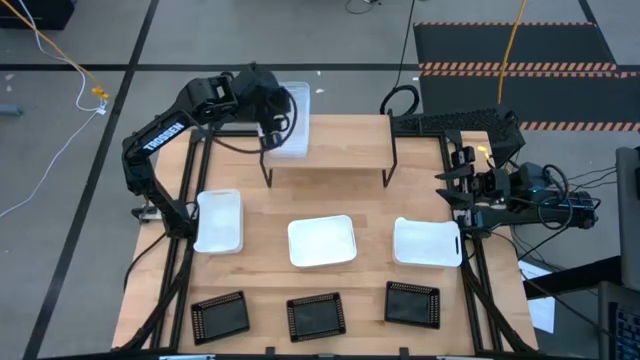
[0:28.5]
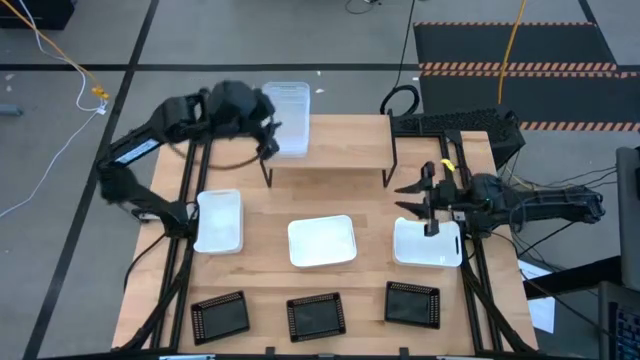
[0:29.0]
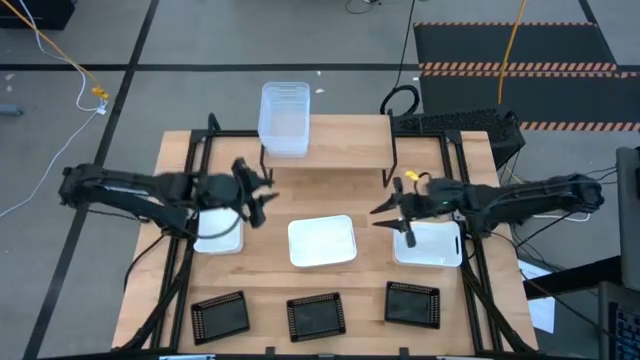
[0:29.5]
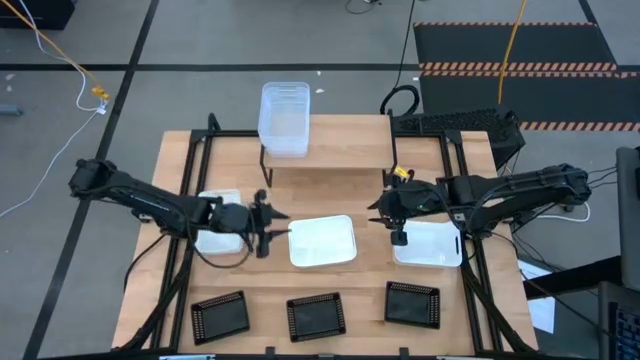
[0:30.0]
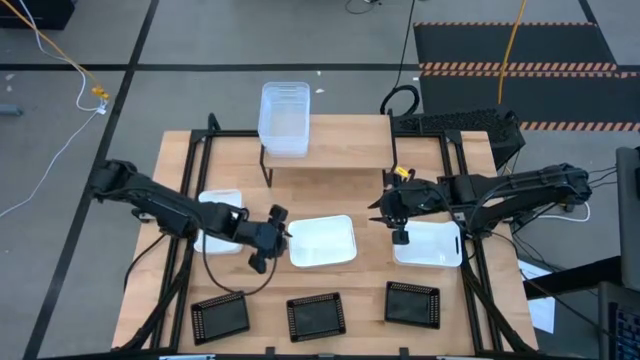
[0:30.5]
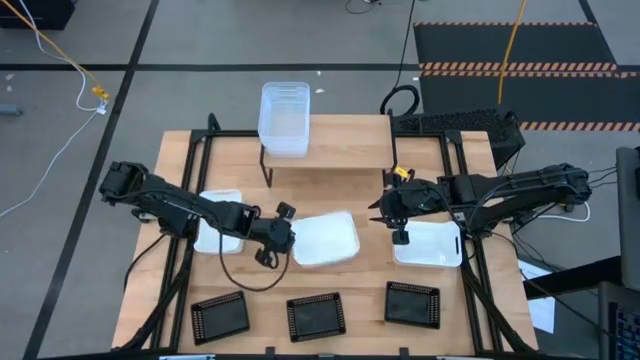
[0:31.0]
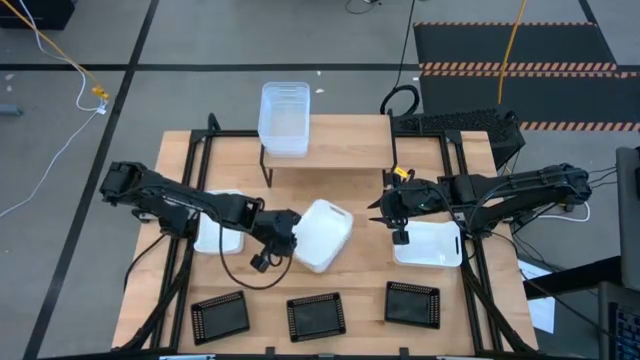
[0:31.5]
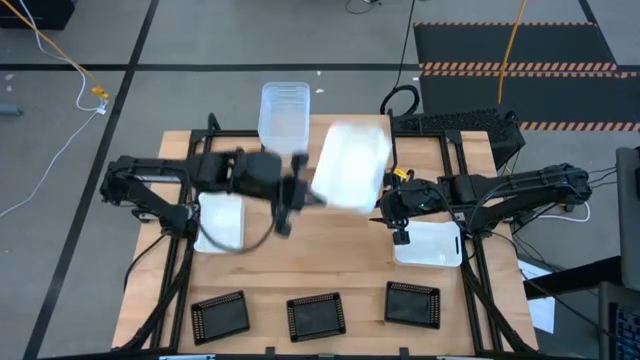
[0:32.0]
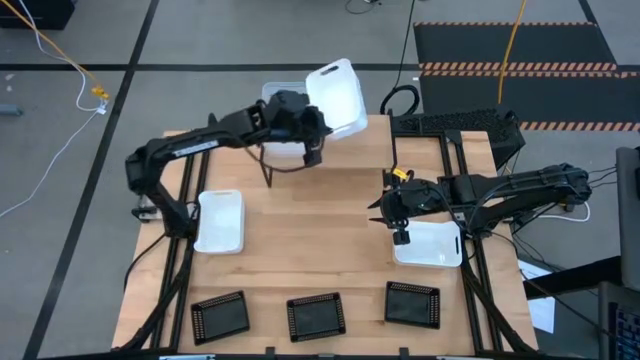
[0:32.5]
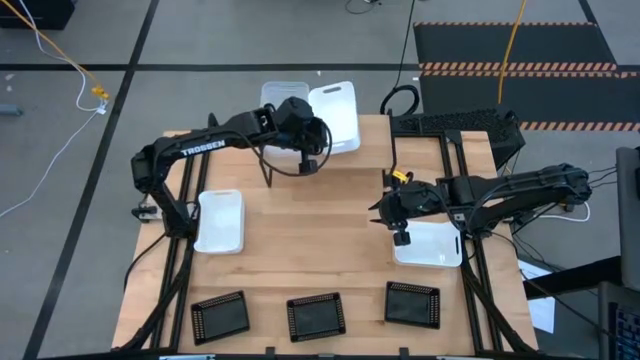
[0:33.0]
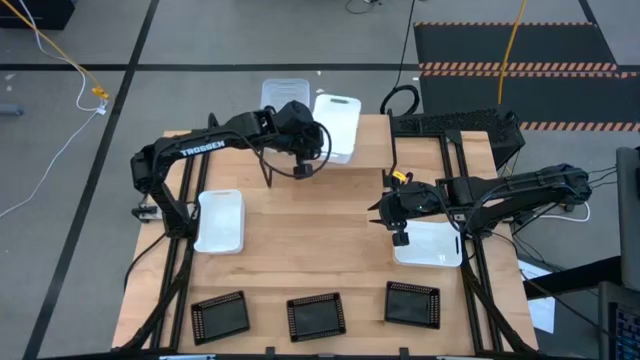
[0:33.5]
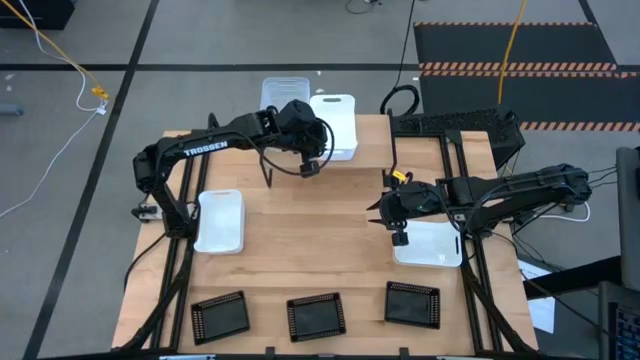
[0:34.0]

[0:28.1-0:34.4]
Task: Stack baskets on shelf by color
Put the middle white bin on the shelf

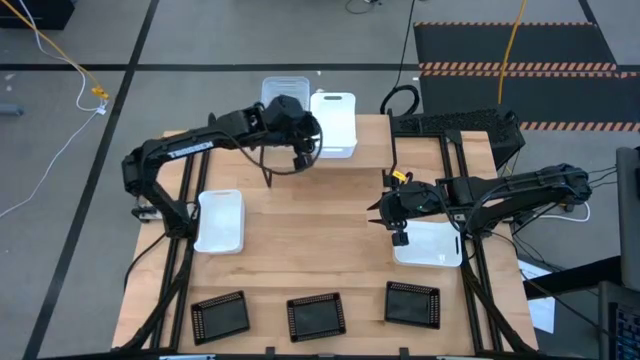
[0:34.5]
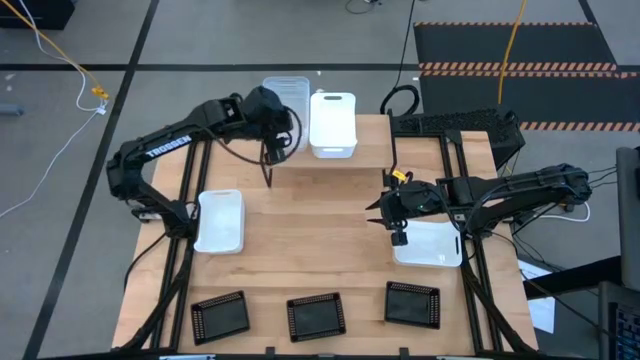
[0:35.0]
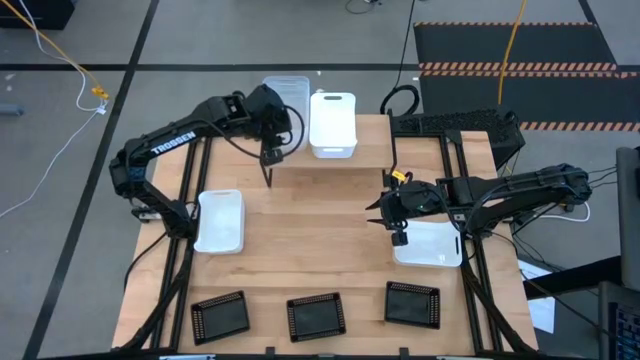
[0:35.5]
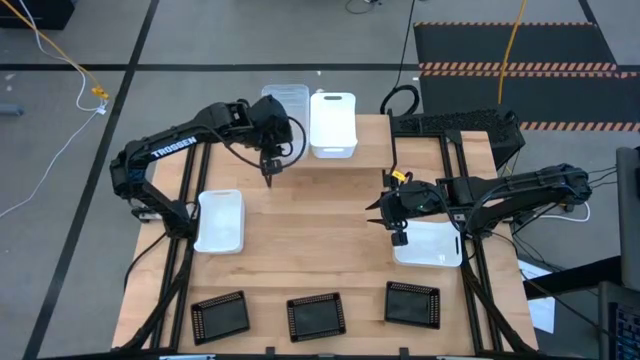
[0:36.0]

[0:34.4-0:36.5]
Adjust the transparent bins on the shelf

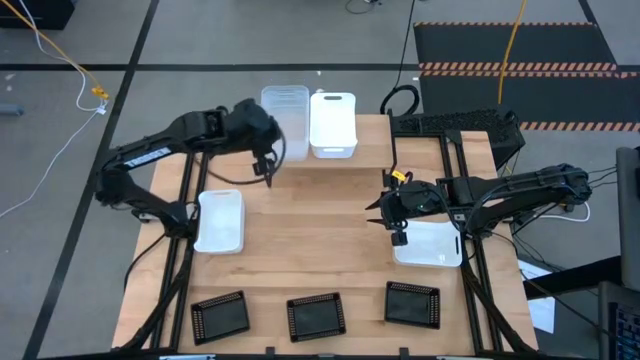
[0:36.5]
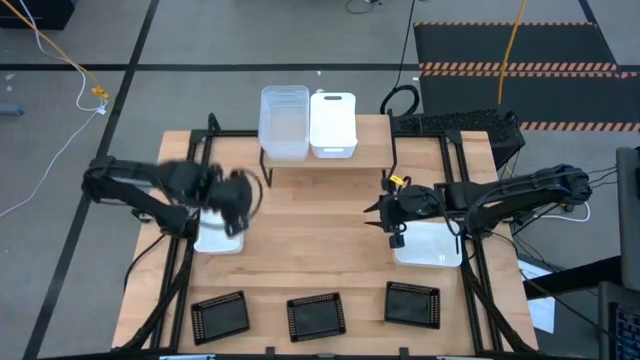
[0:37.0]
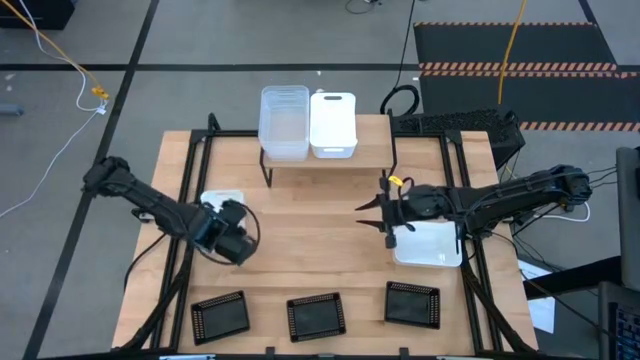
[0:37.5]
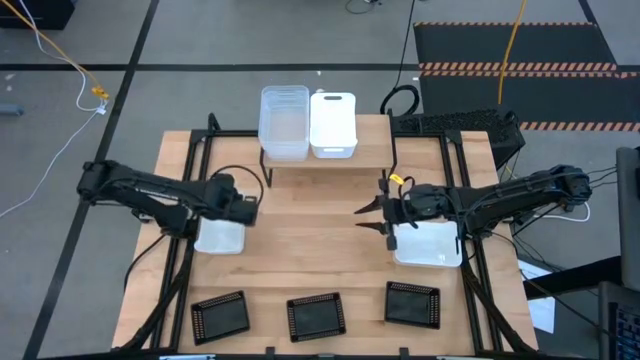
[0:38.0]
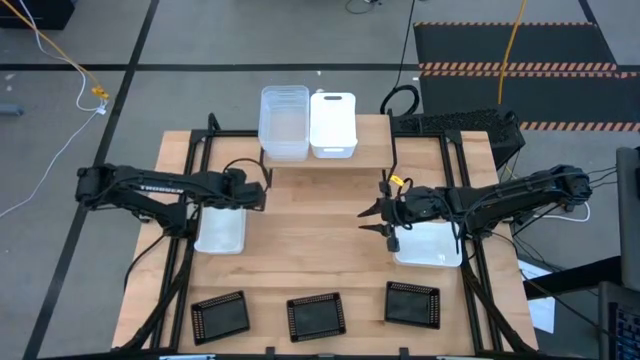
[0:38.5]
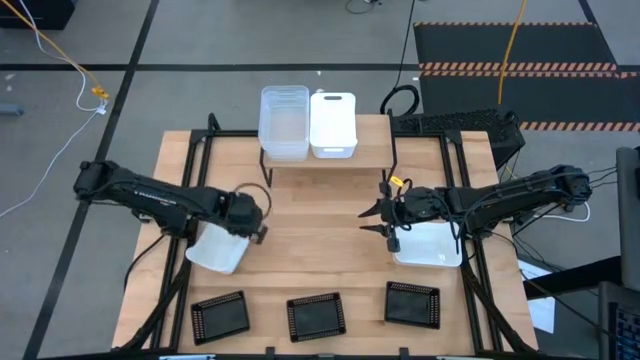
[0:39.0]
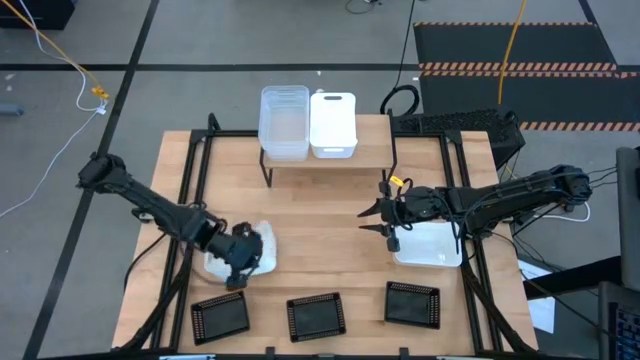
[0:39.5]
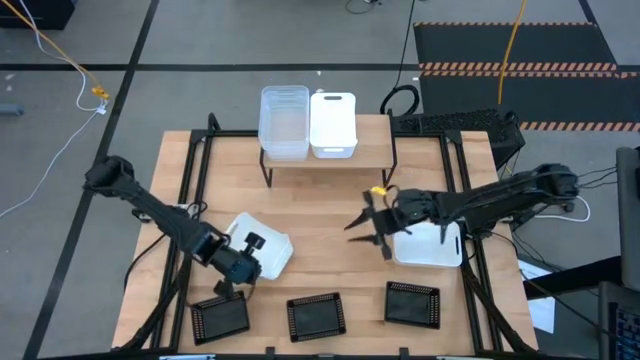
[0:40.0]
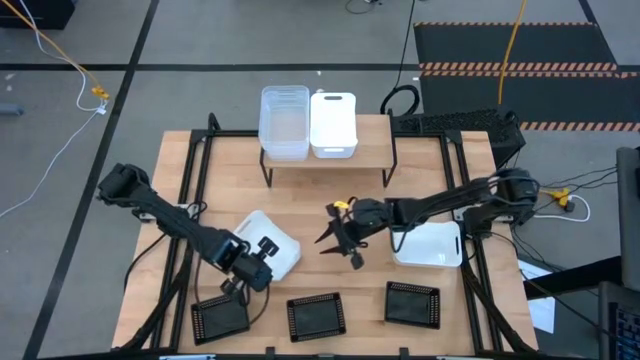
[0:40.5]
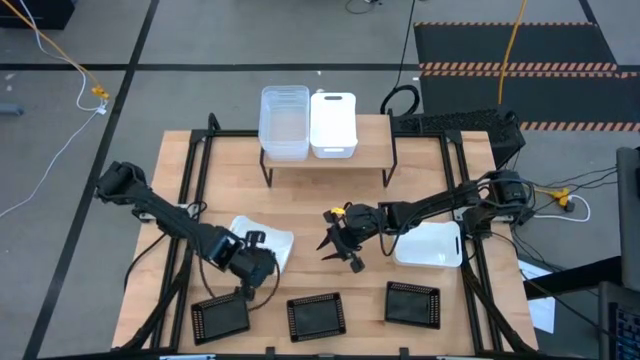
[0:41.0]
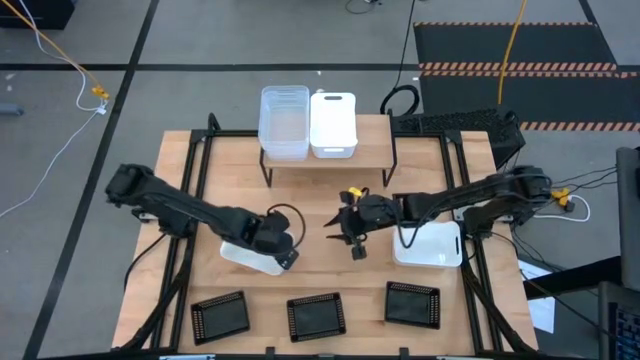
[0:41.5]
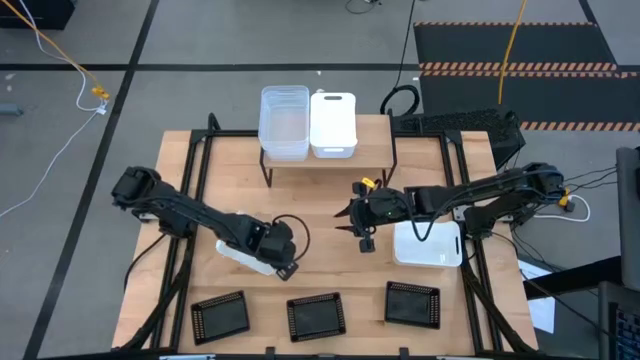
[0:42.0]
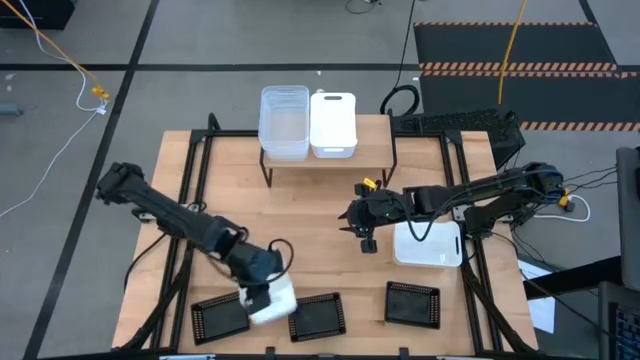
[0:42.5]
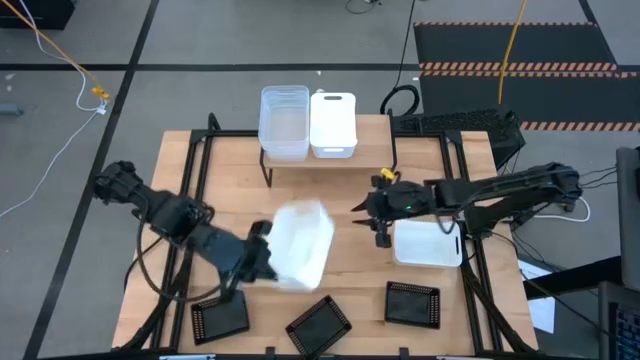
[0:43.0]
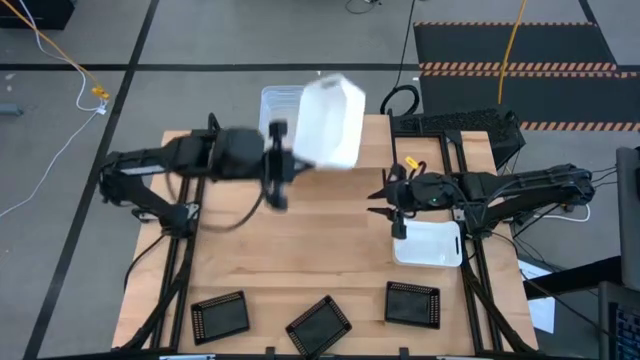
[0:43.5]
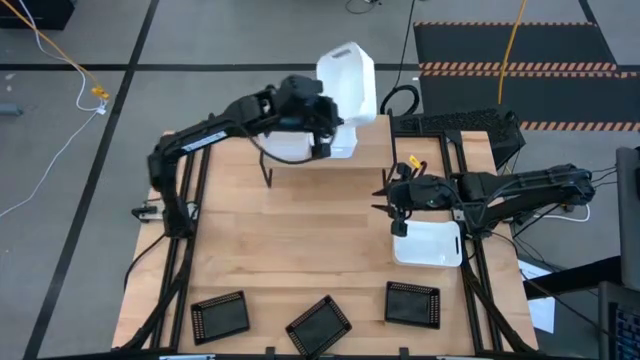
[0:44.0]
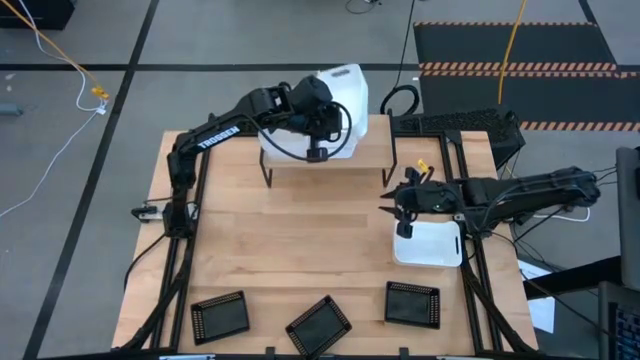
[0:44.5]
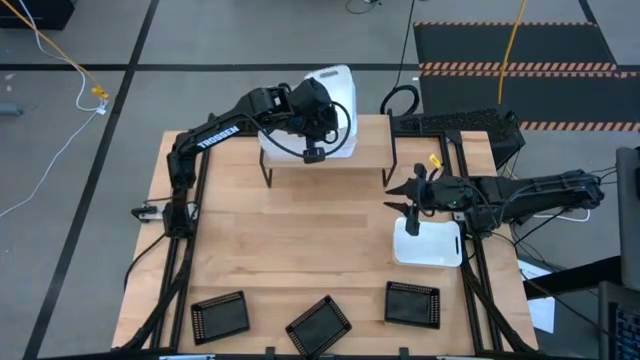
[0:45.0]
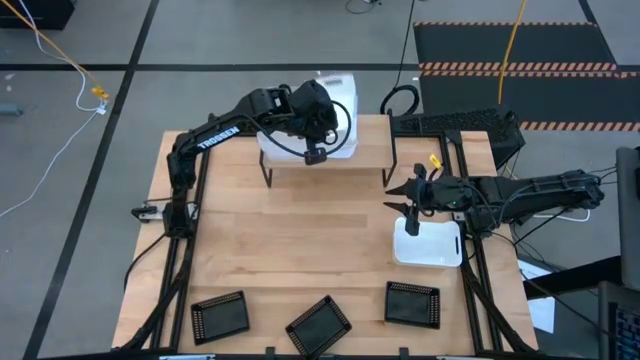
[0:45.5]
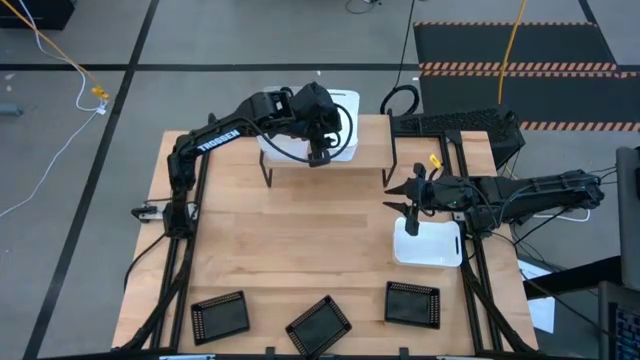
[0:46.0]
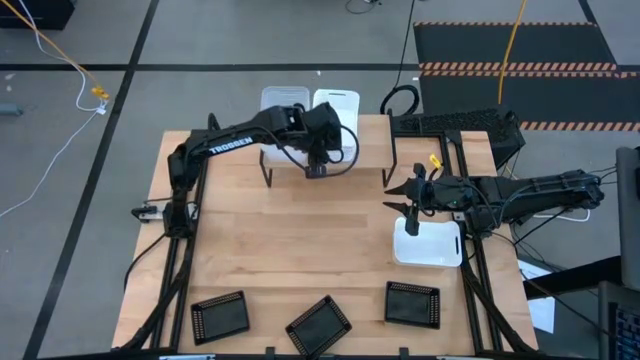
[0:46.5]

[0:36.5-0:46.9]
Stack the left white bin on the white bin on the shelf

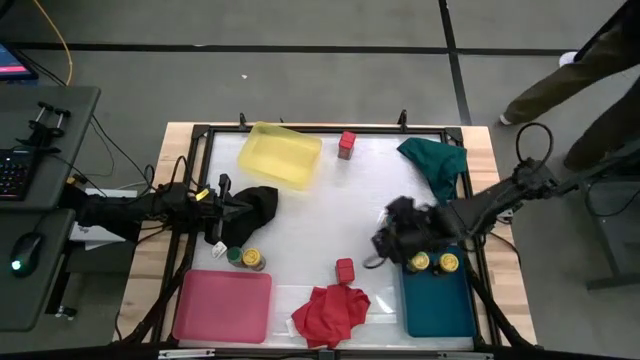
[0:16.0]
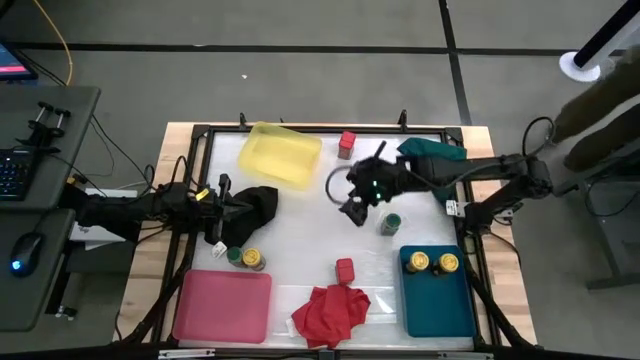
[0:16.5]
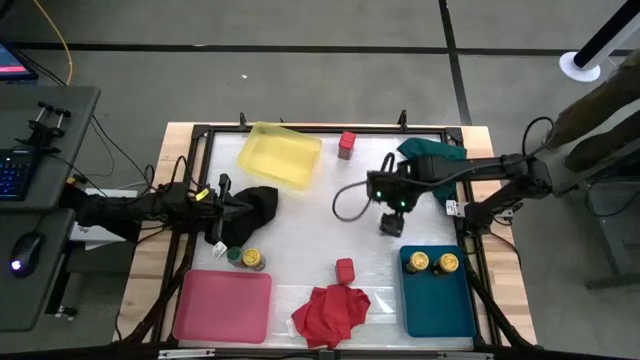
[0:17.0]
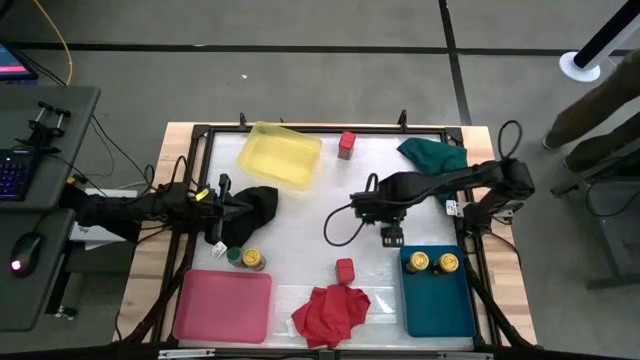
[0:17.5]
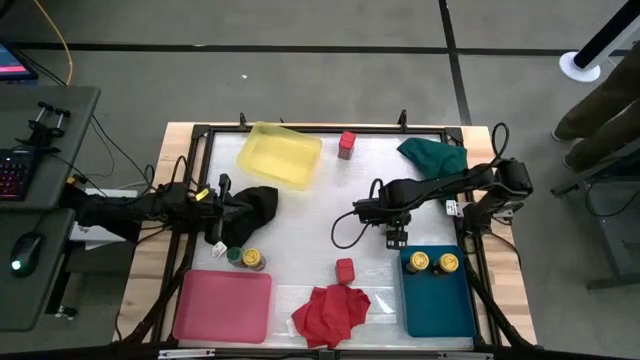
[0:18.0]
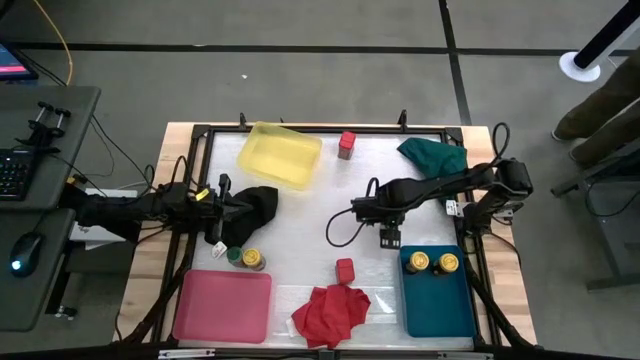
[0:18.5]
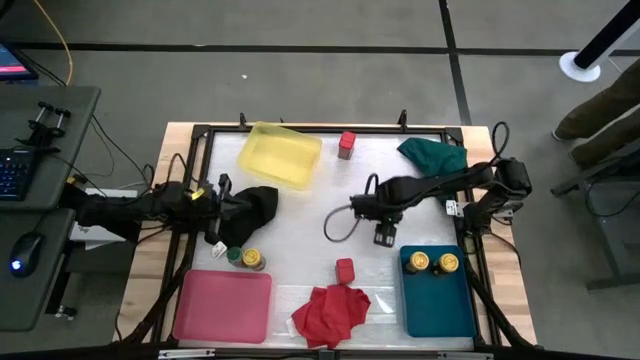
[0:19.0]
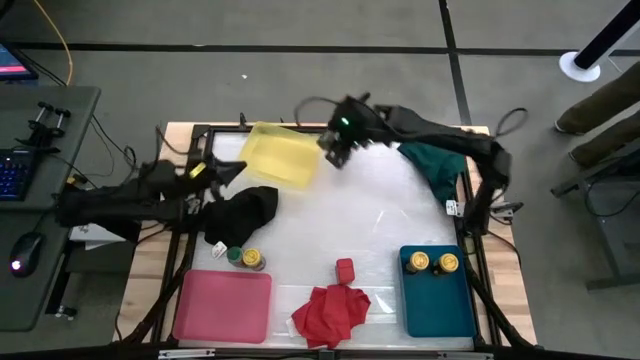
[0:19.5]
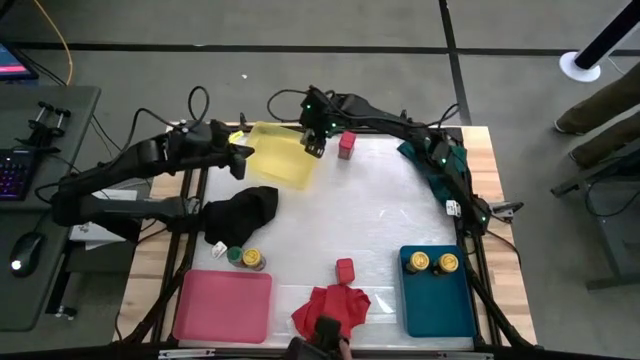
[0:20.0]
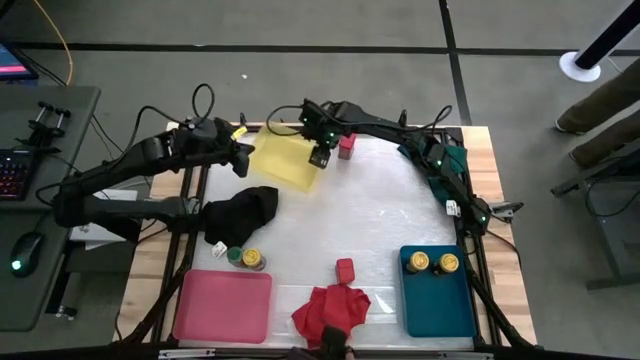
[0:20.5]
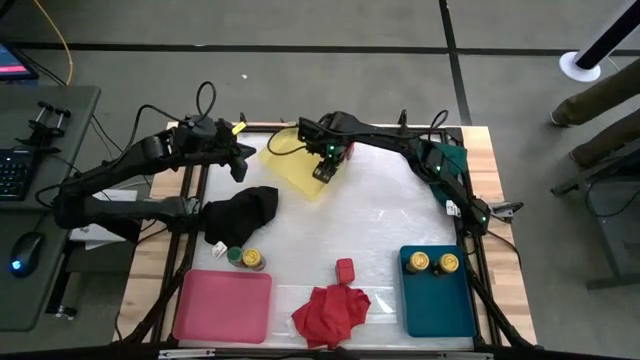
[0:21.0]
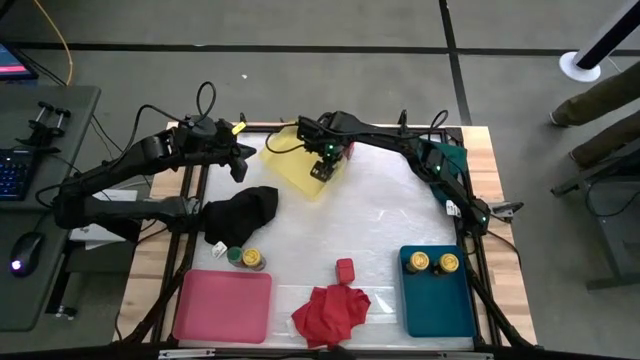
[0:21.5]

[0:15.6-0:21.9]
Task: Sort spices by type
Put the right green seasoning bottle into the yellow bin
